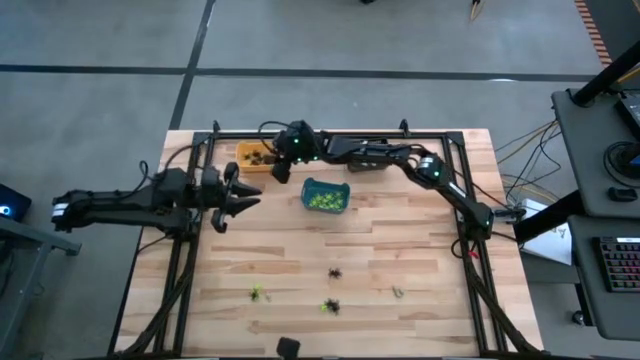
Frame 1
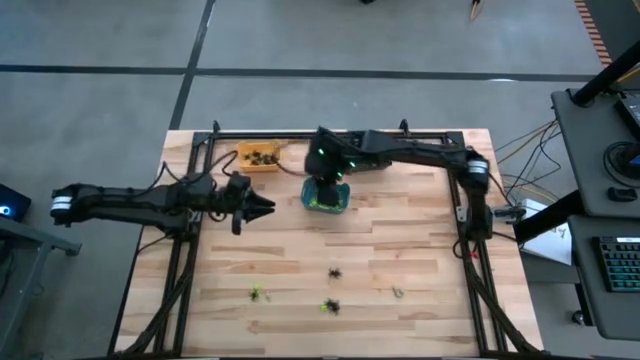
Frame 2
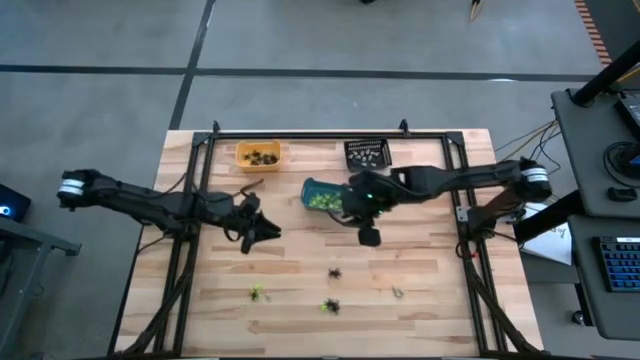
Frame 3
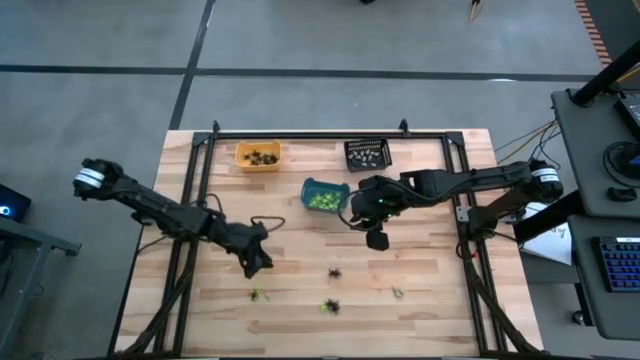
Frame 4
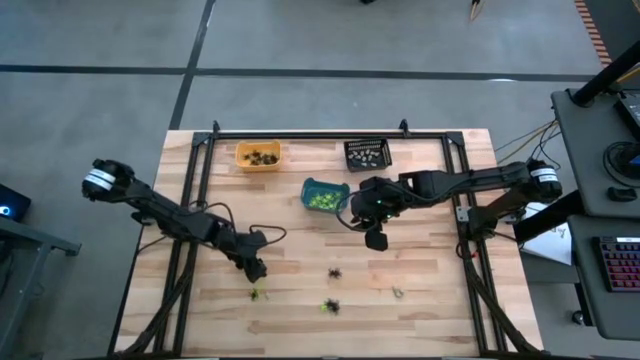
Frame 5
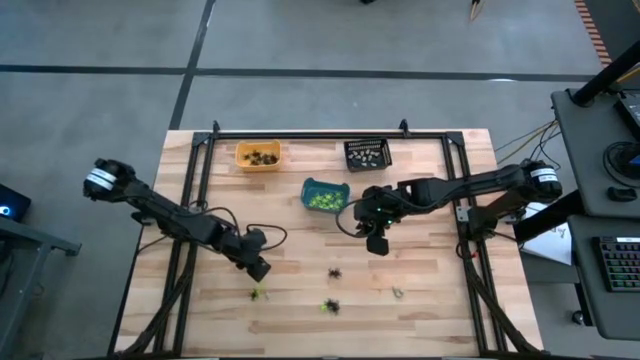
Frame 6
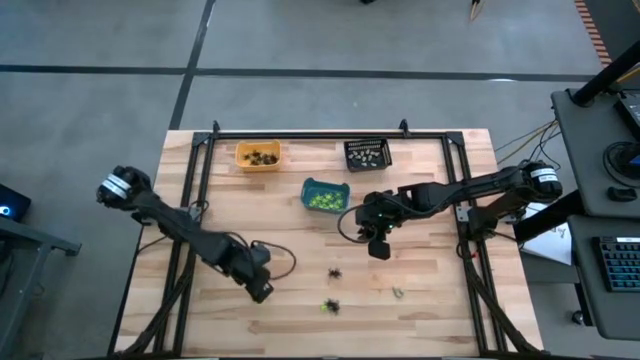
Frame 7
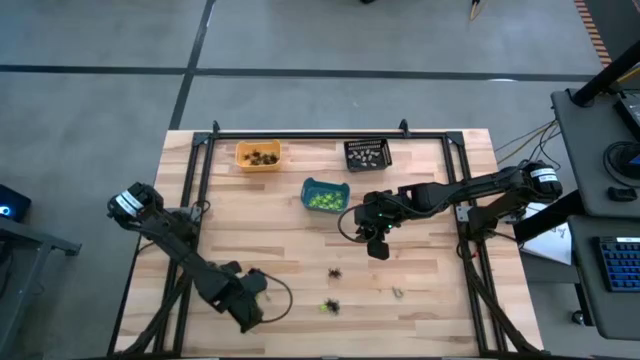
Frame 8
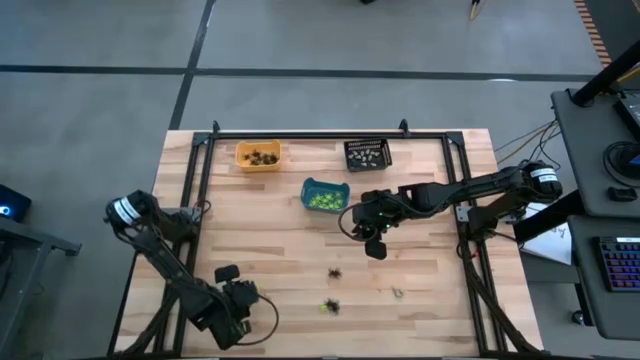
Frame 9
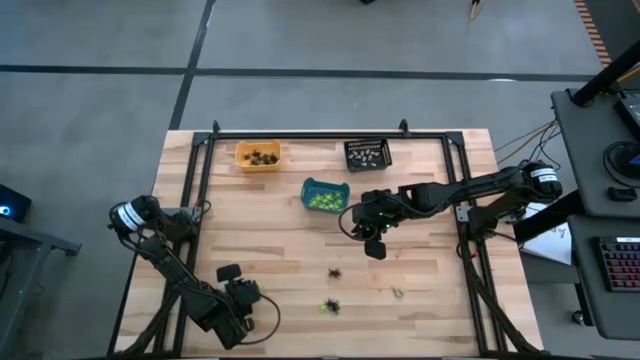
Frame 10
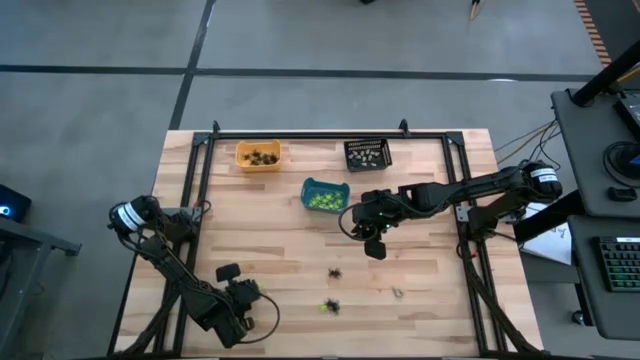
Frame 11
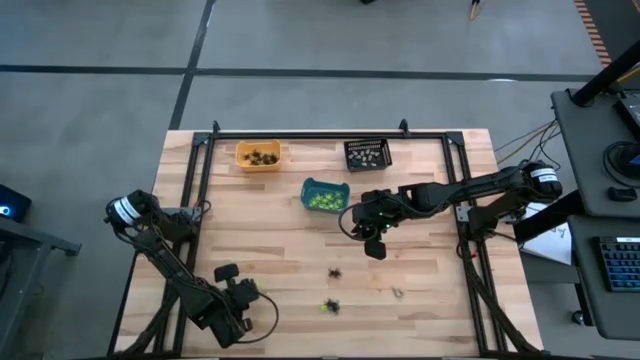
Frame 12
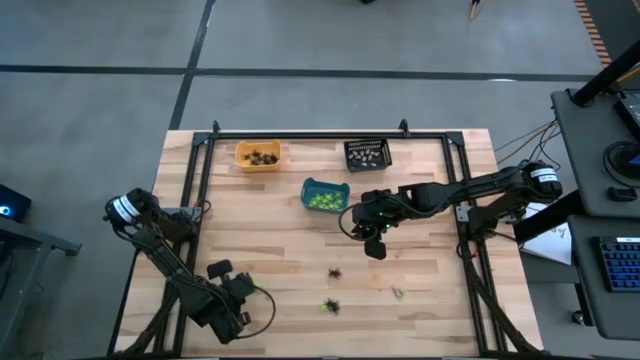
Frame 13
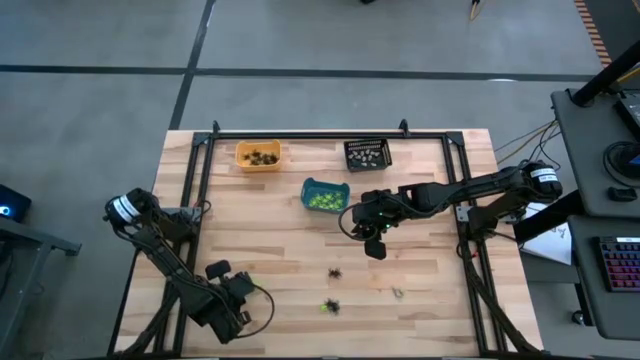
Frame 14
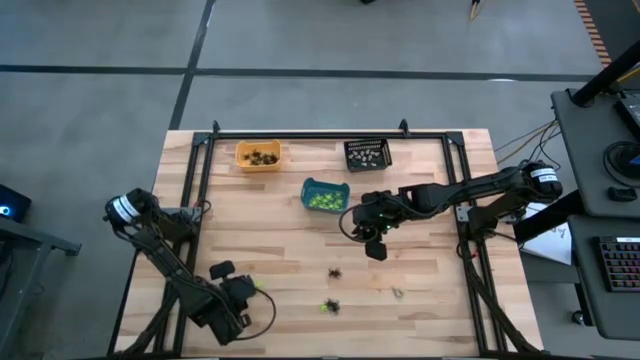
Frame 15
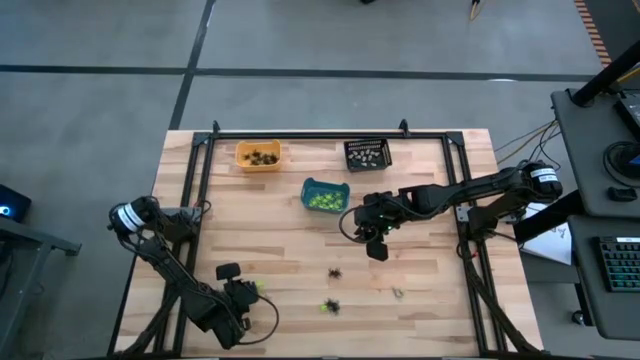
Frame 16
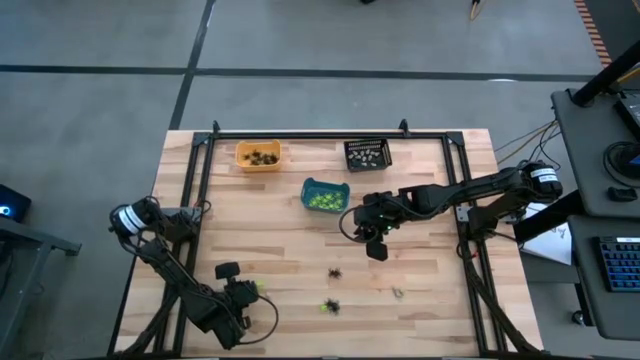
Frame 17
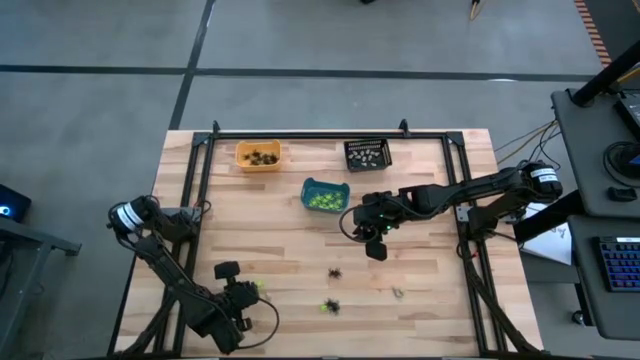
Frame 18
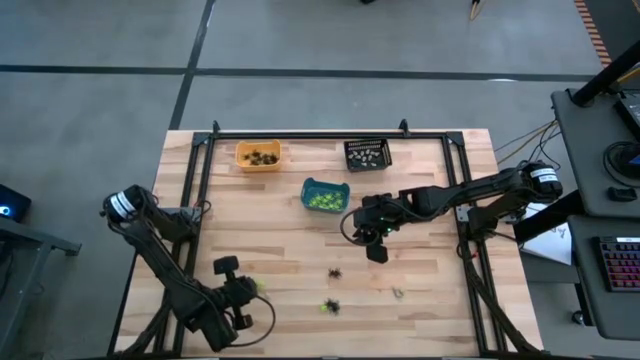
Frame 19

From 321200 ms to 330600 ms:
Task: Sort Halloween decoration
Put the black spider toy into the yellow bin

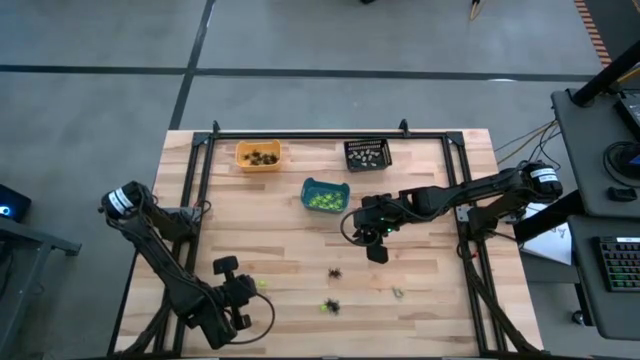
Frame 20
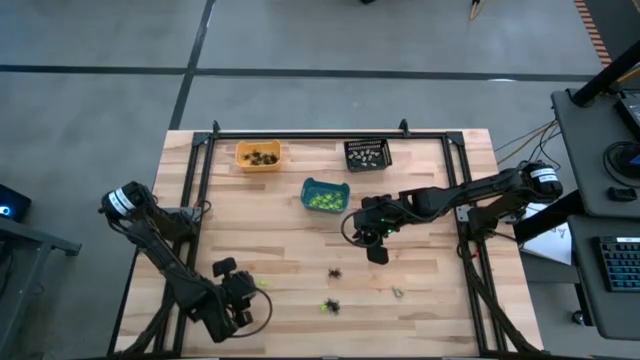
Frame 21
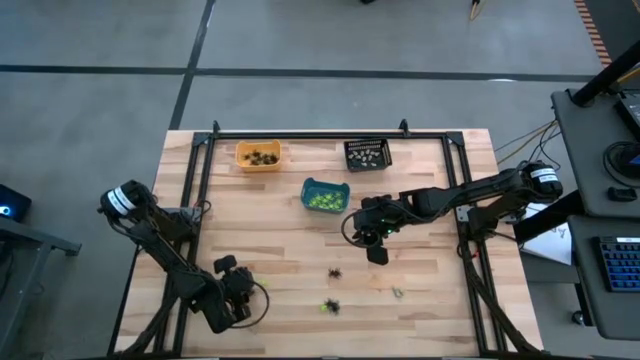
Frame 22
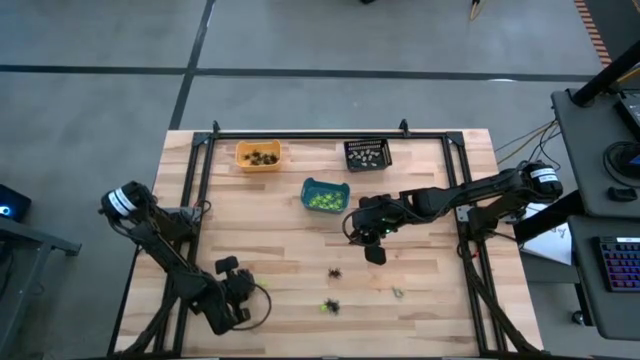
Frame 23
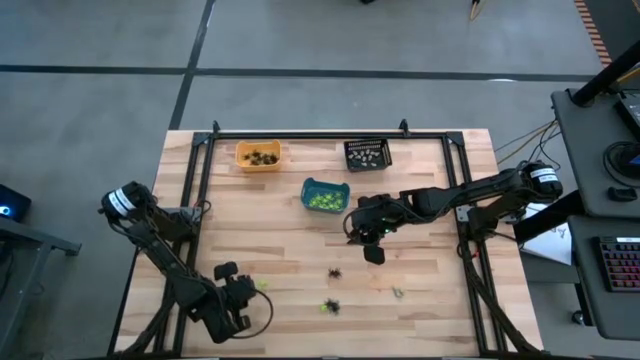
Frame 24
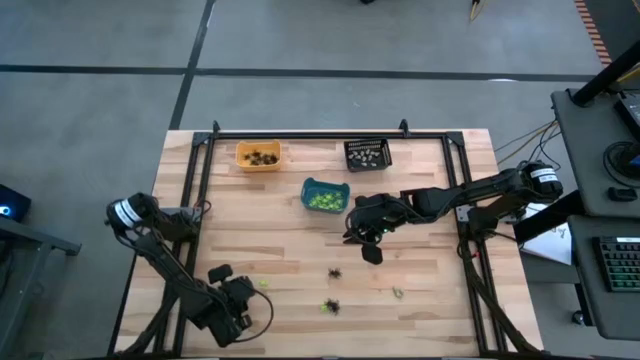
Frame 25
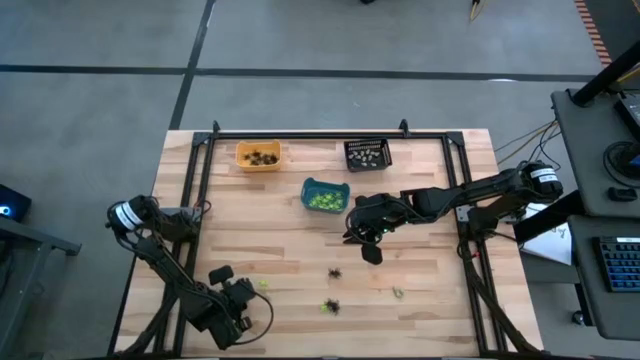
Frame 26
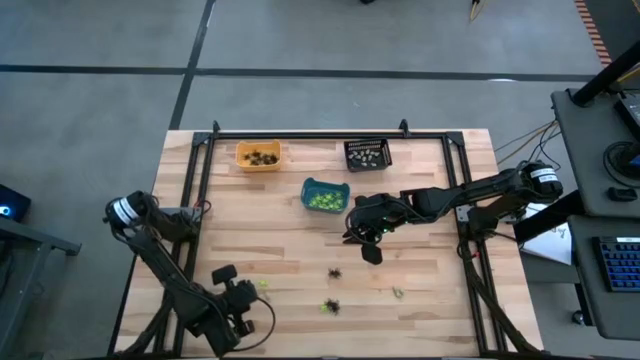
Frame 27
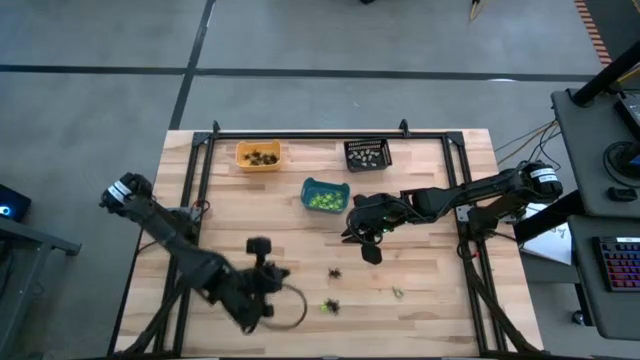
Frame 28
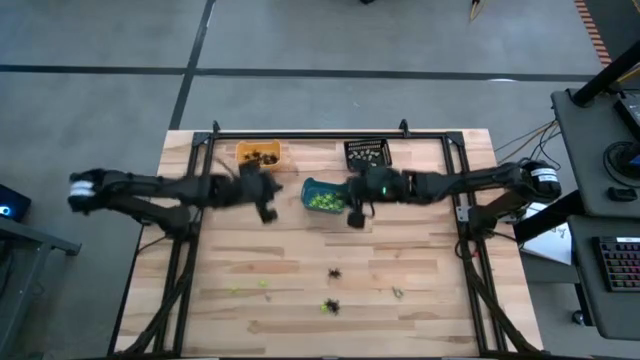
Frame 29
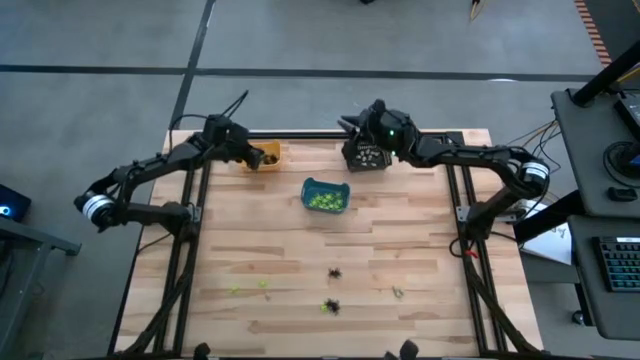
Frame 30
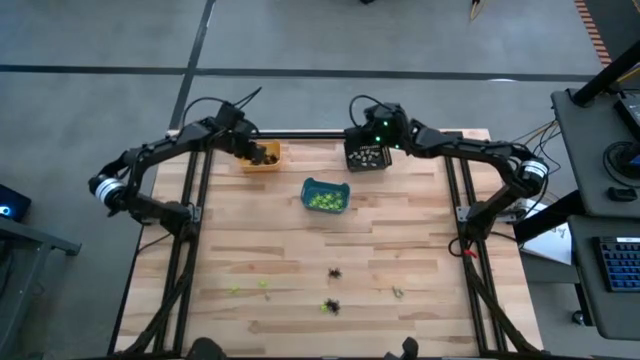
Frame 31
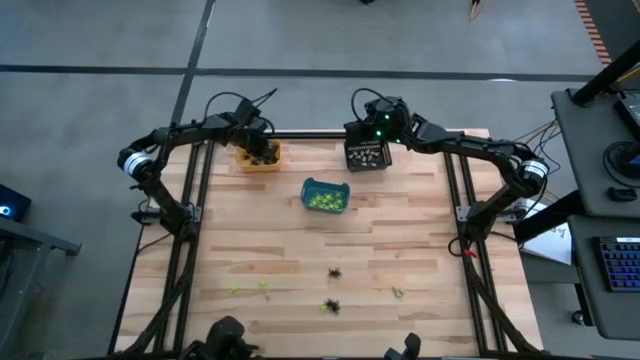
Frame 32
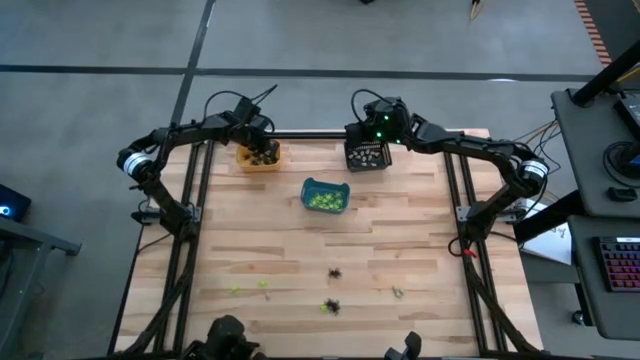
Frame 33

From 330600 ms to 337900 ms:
Put the black spider toy into the yellow bin

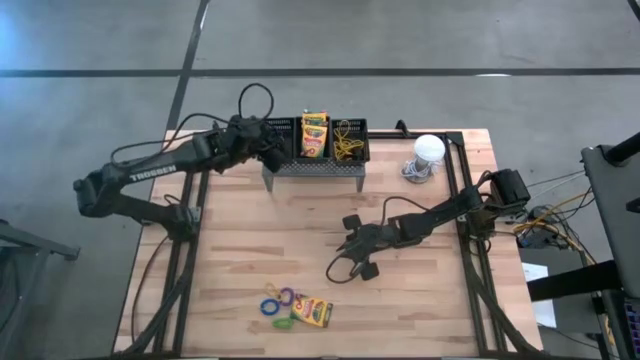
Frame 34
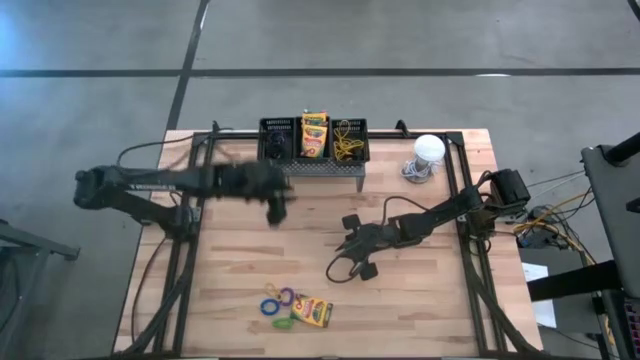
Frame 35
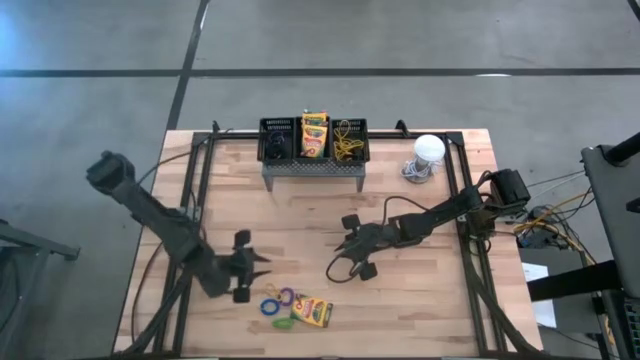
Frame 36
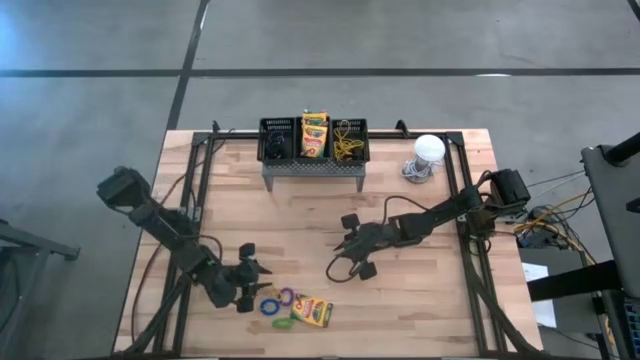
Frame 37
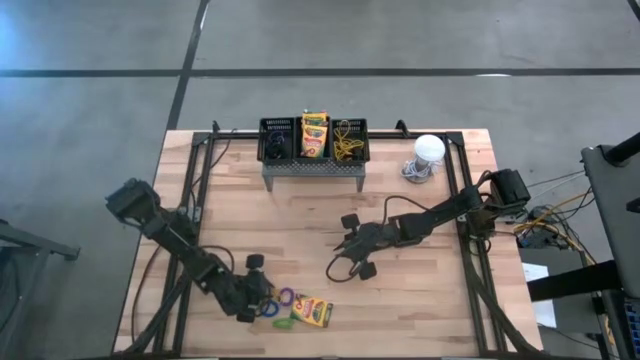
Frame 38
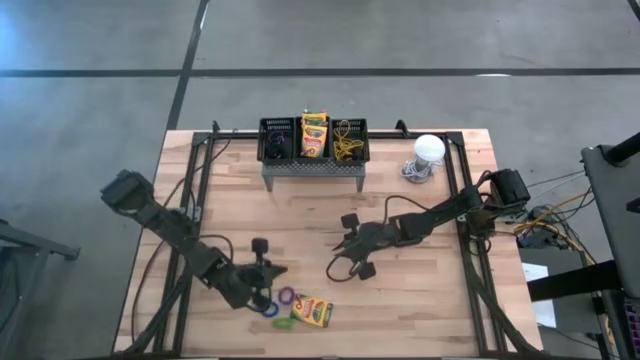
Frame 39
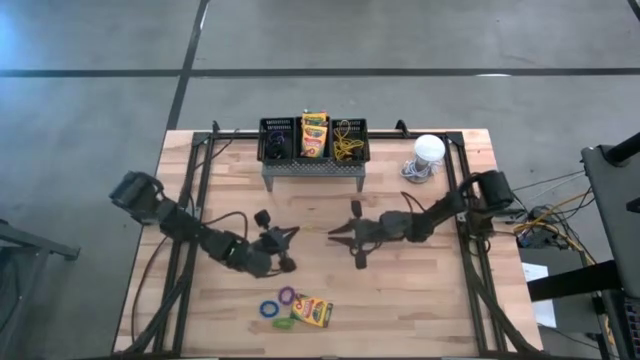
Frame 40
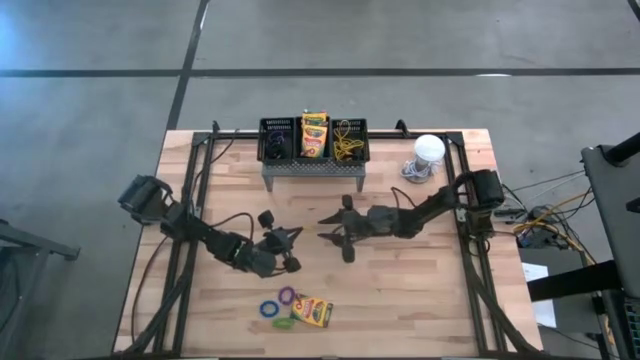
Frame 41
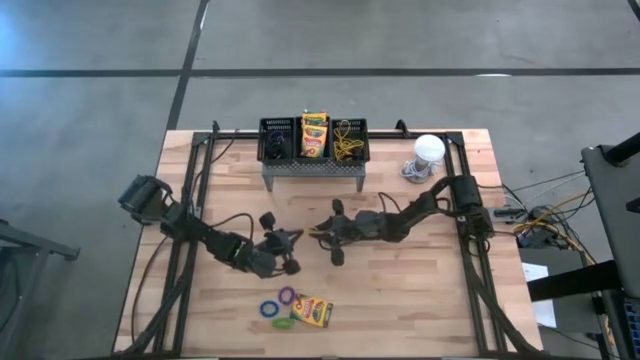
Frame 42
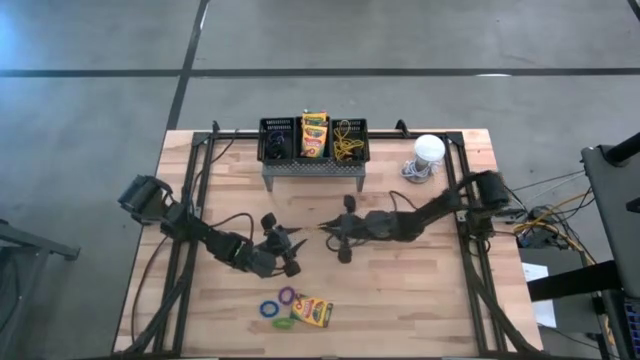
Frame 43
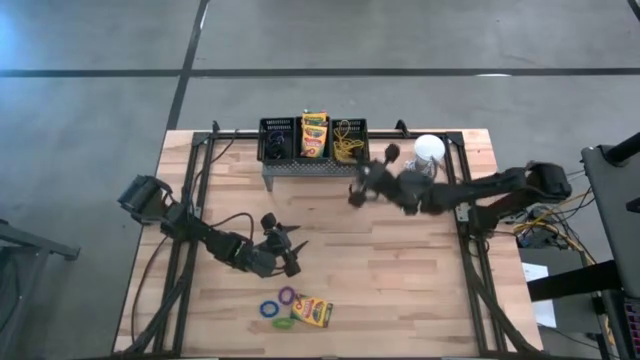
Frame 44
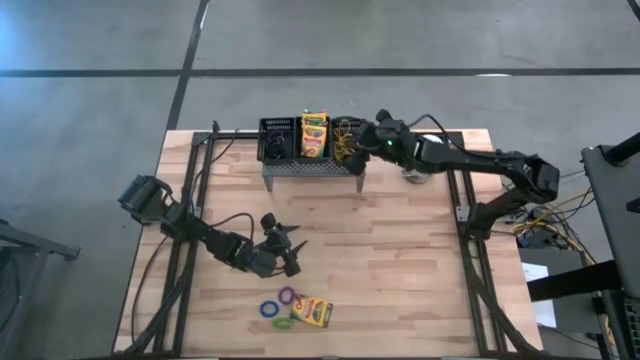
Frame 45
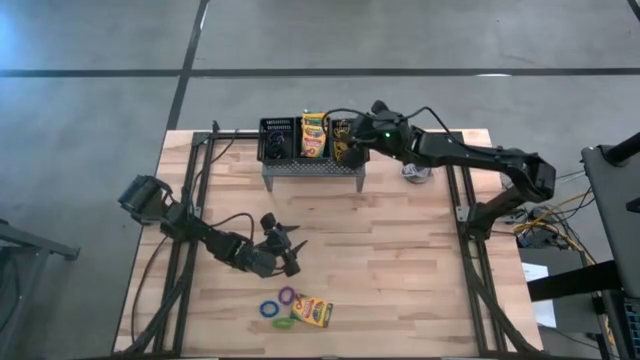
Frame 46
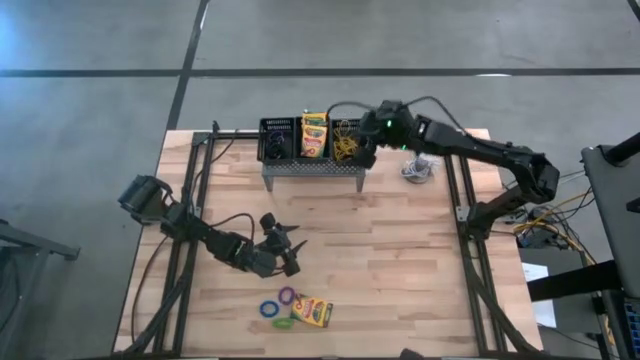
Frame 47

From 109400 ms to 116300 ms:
Task: Pick & Place Office Desk Supplies
Put the yellow rubber band into the right black basket on the shelf
